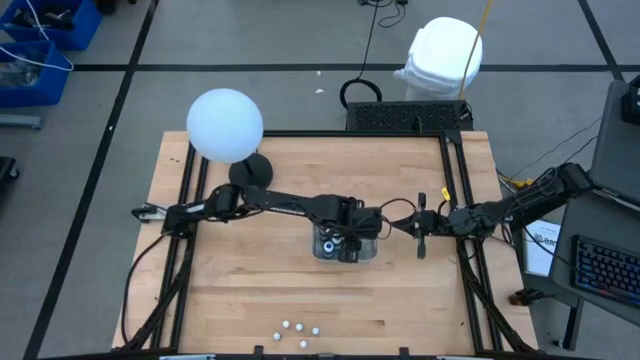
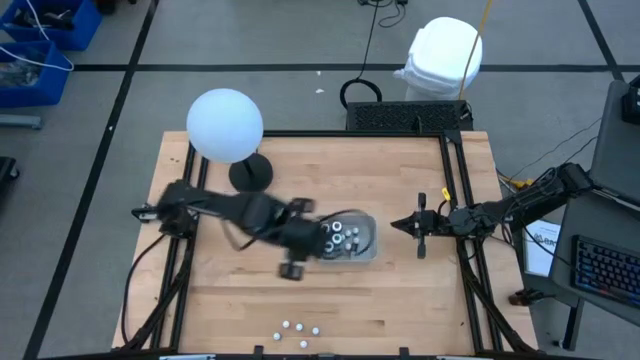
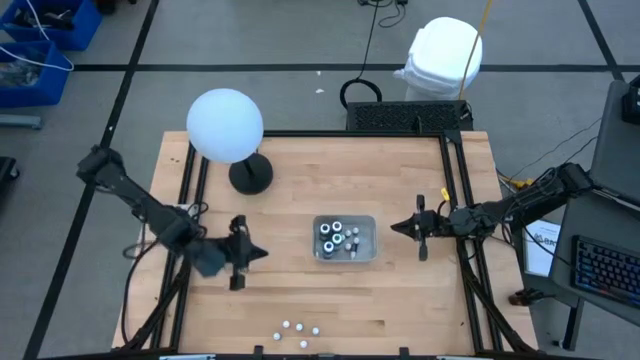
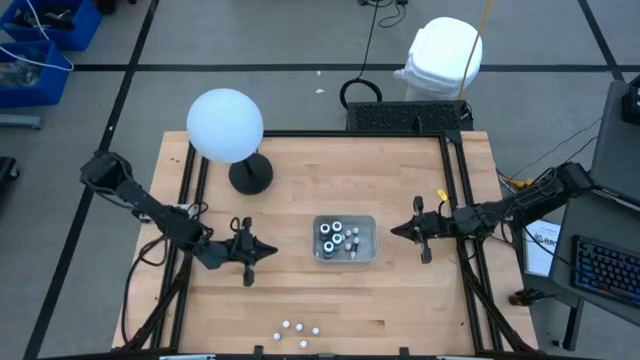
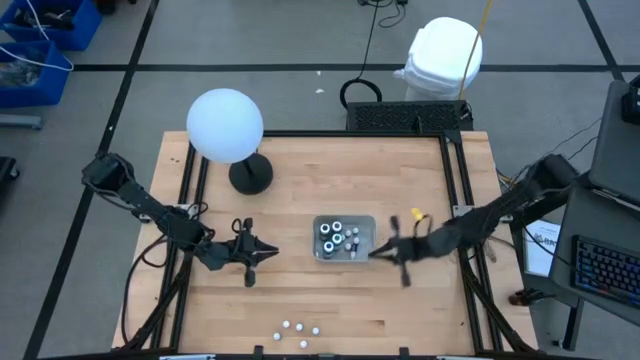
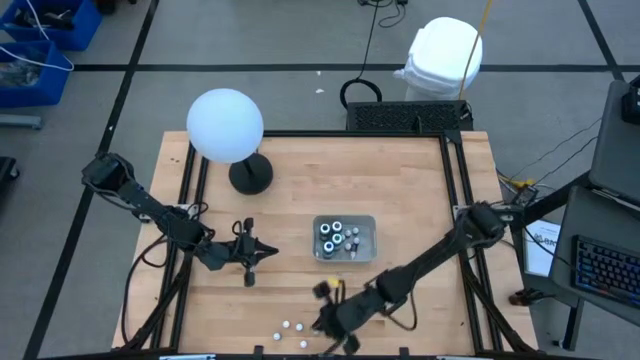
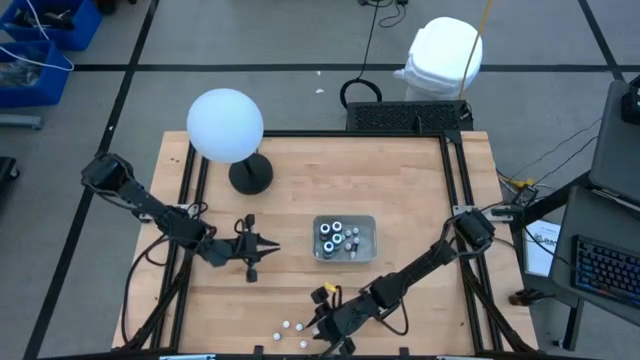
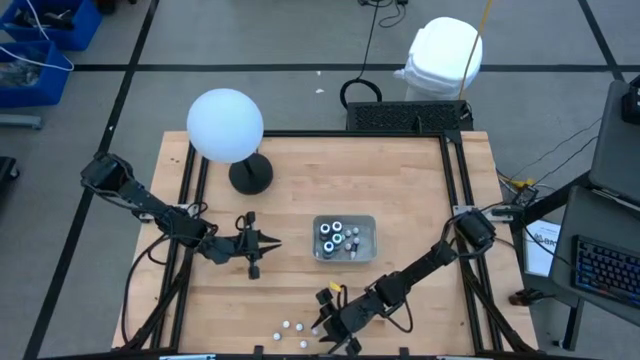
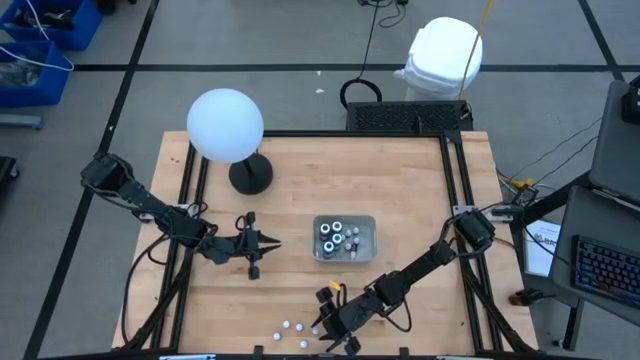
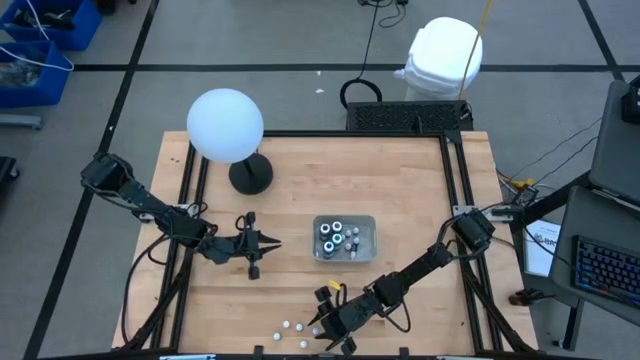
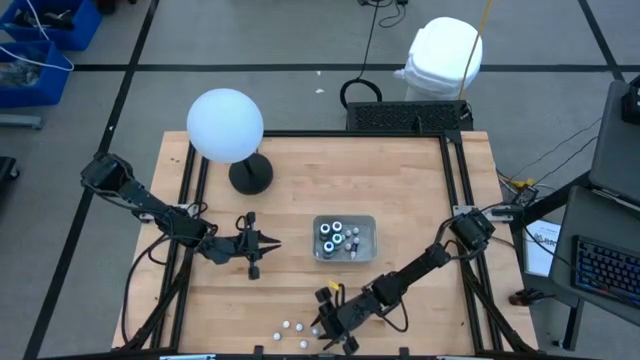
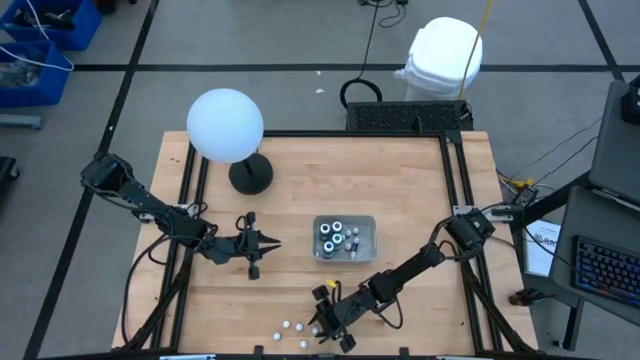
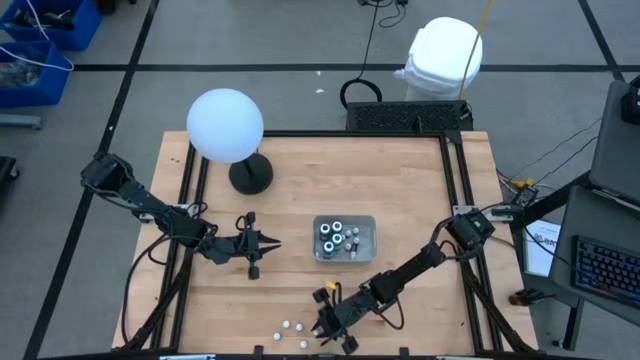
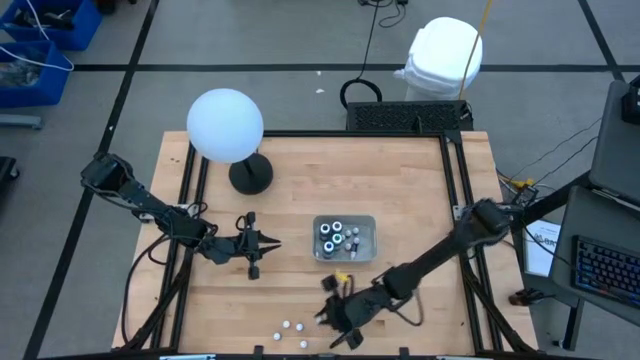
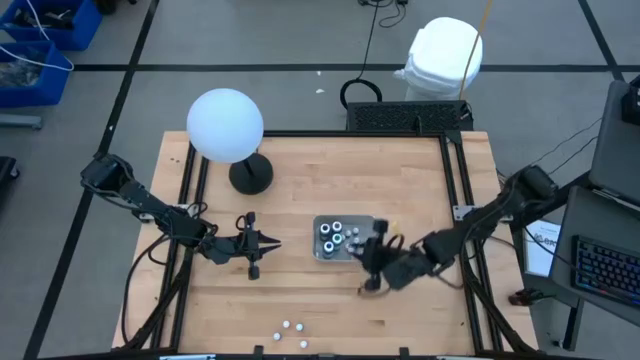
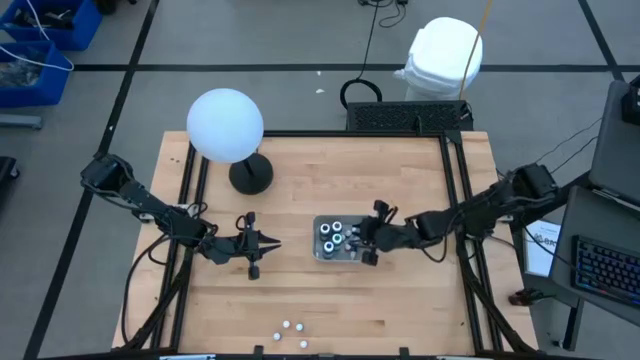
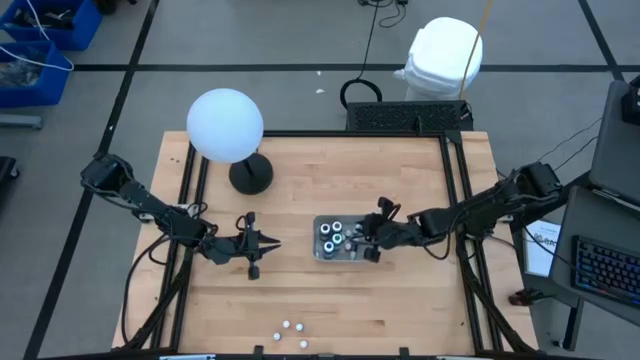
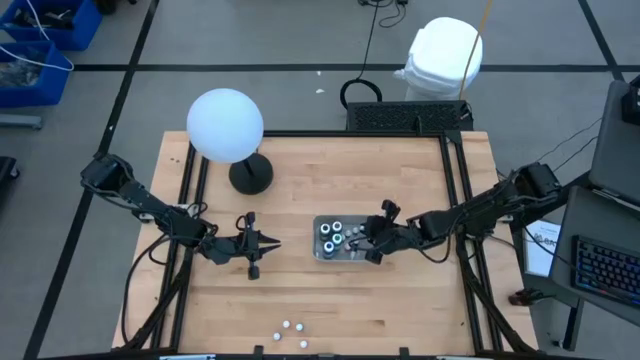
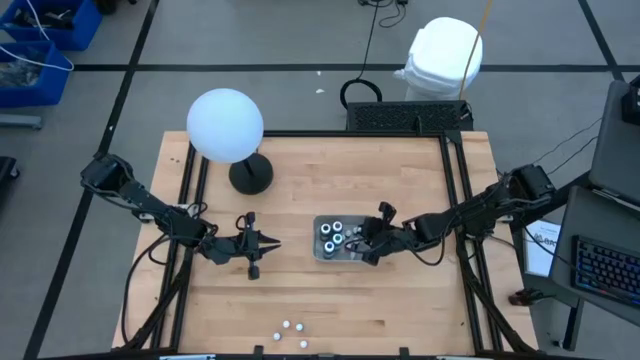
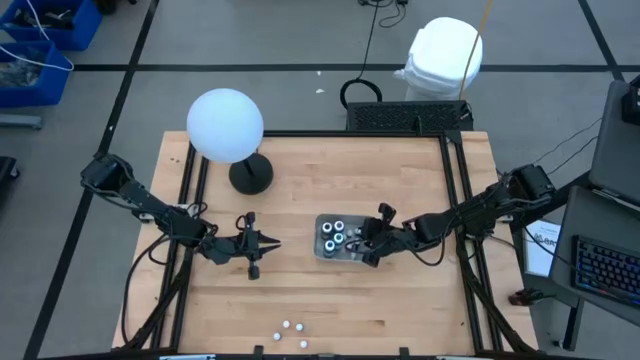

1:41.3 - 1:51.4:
Task: Pick & Place food coloring
Put the small dark blue food coloring bottle into the gray bin

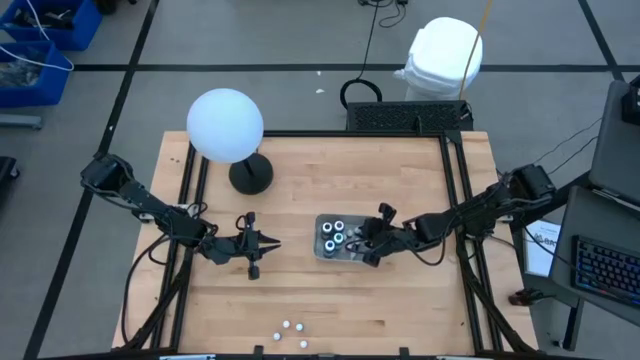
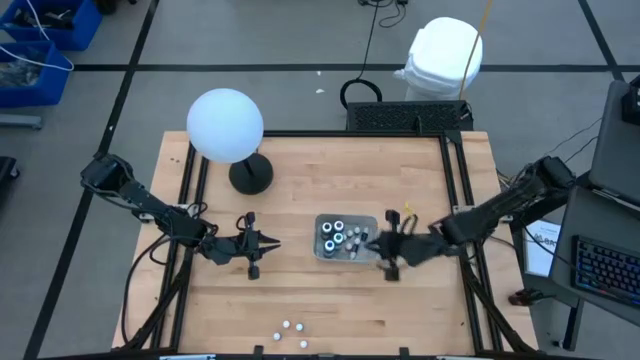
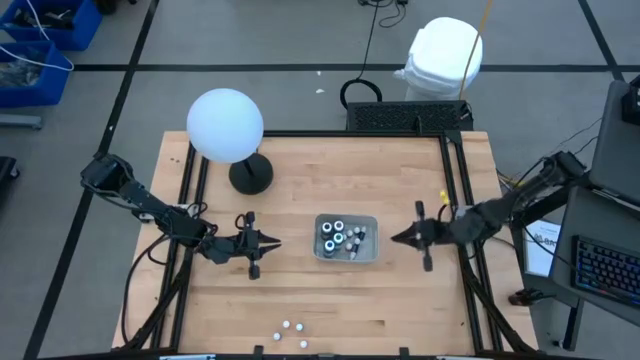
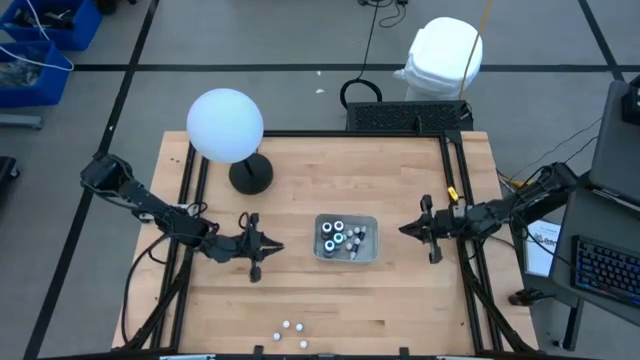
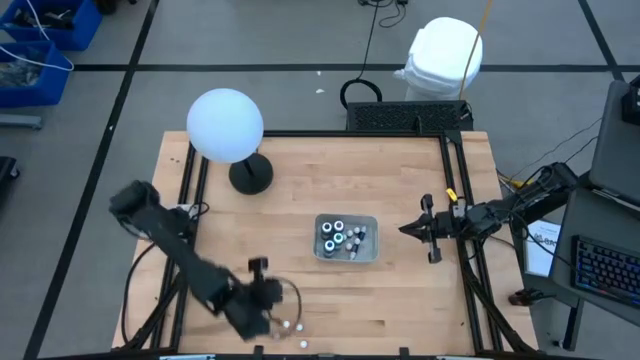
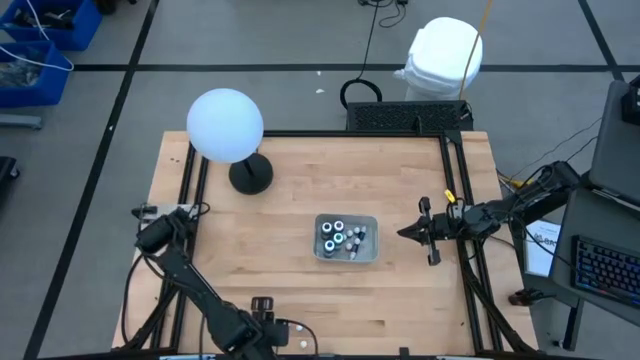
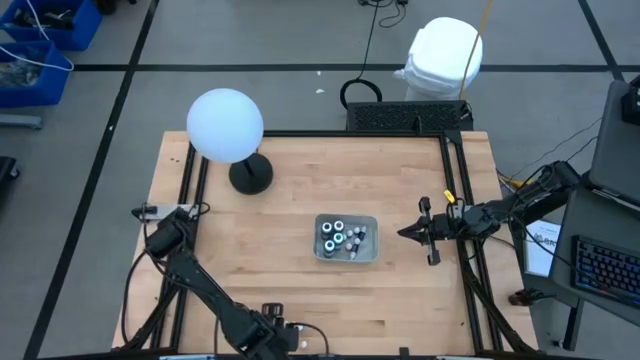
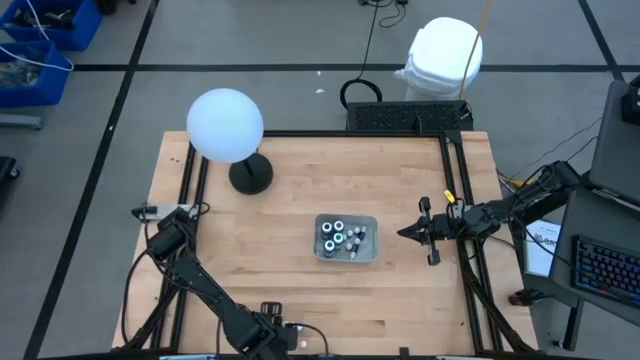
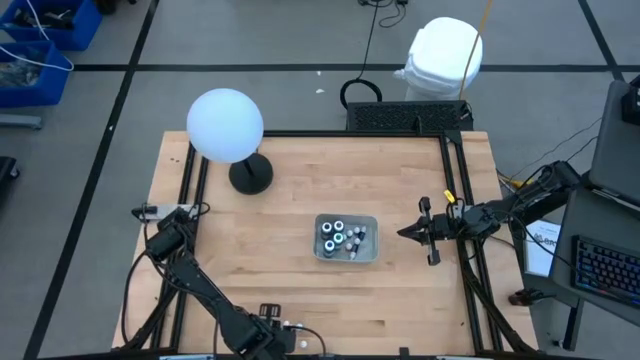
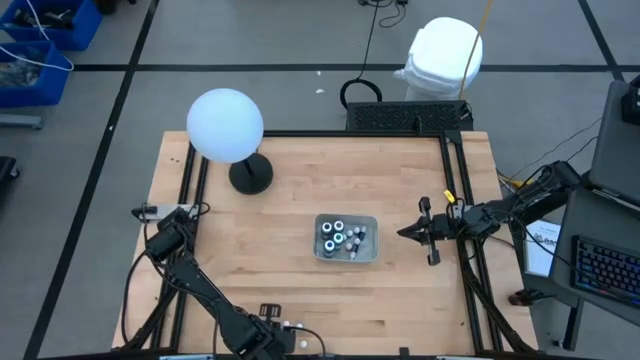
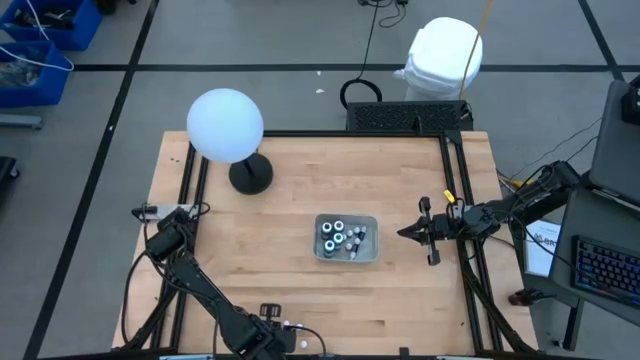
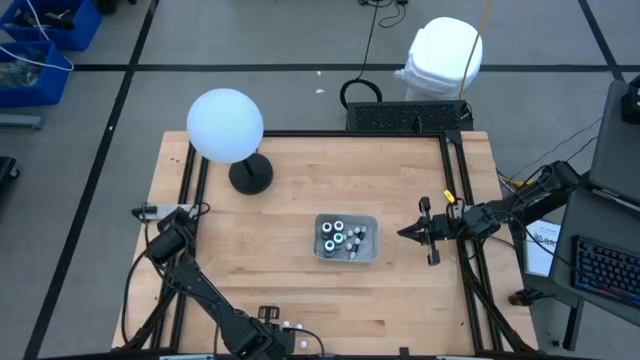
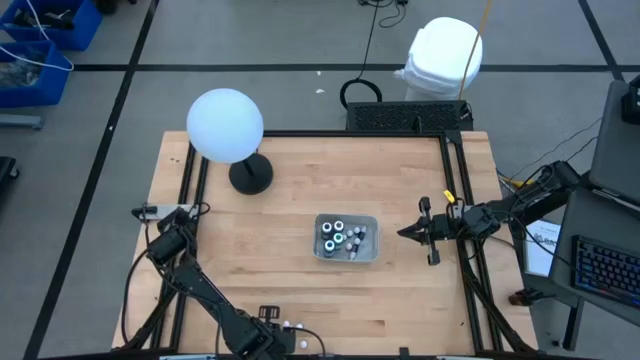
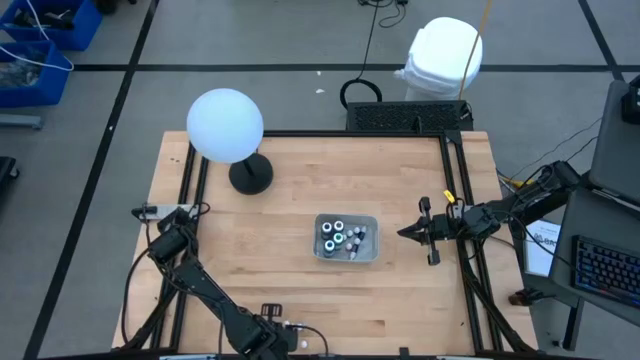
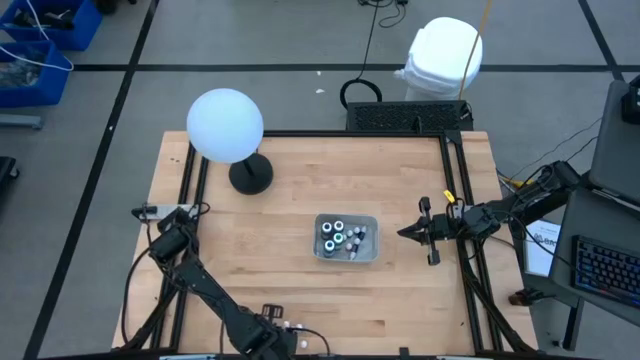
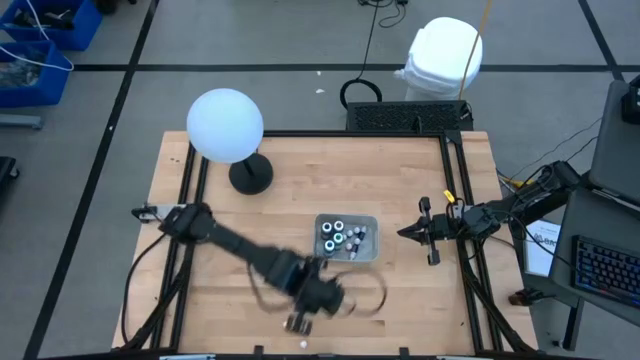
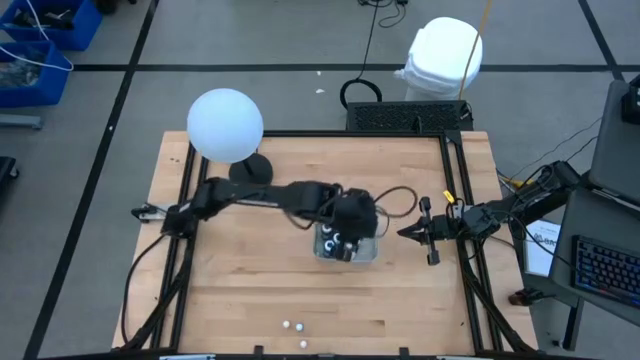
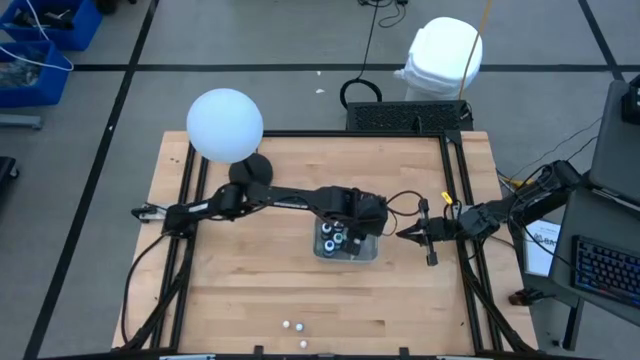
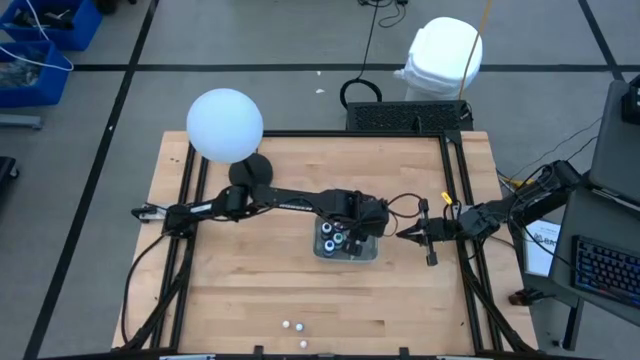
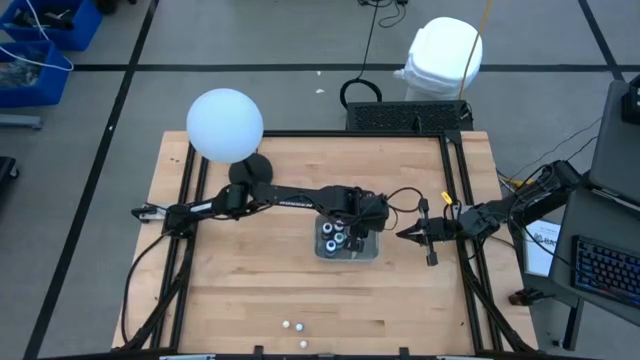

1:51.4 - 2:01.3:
Put the small dark blue food coloring bottle into the gray bin

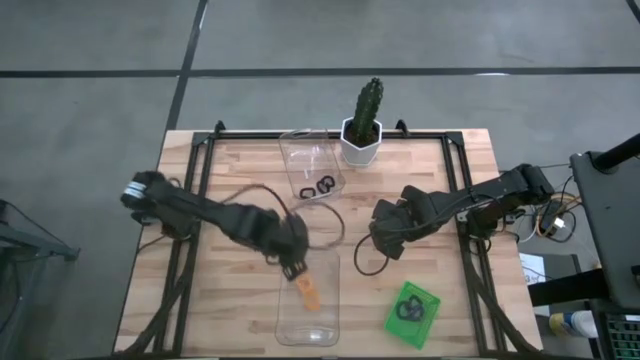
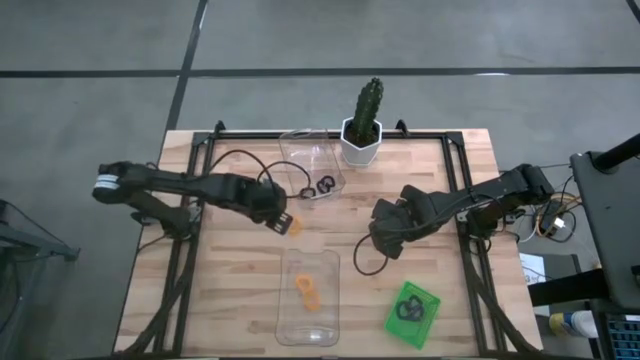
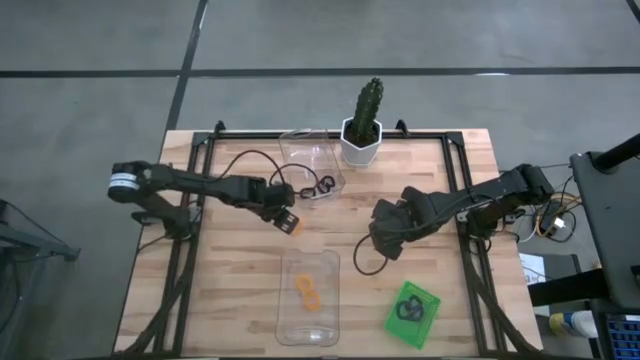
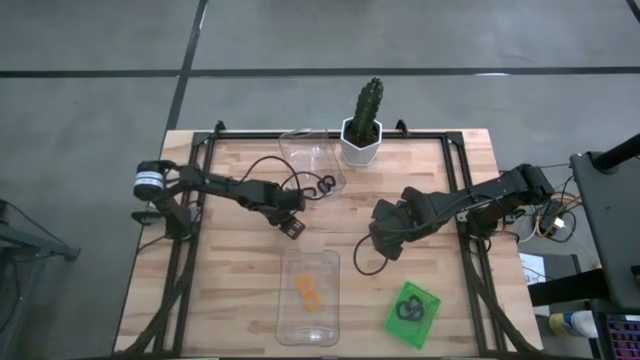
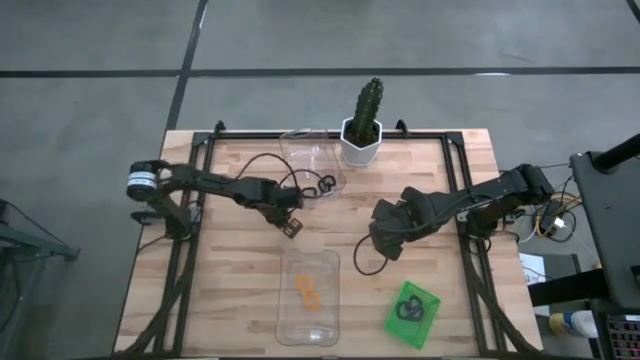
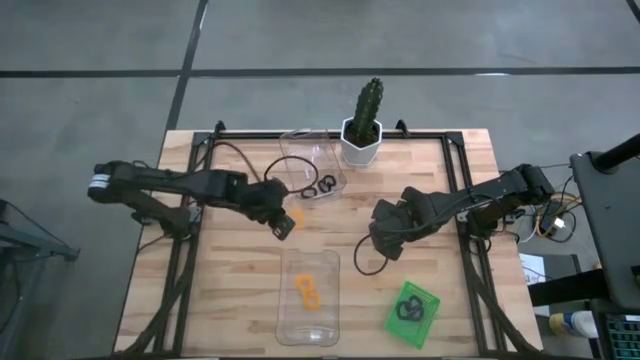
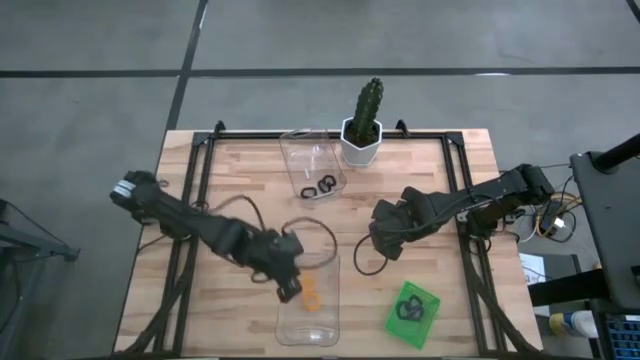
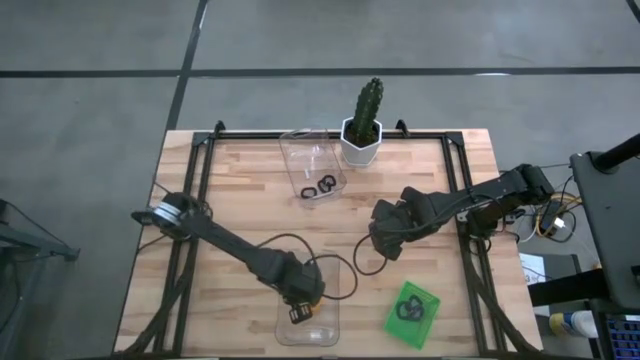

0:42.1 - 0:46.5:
Task: Sort spring keychains
Put the yellow spring keychain into the bottom transparent bin
